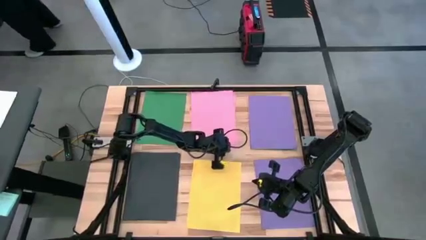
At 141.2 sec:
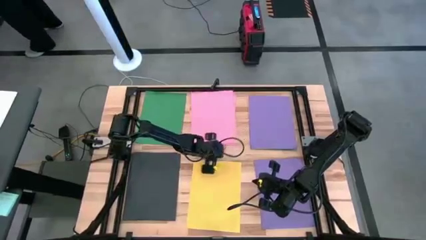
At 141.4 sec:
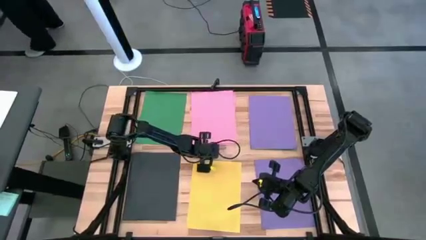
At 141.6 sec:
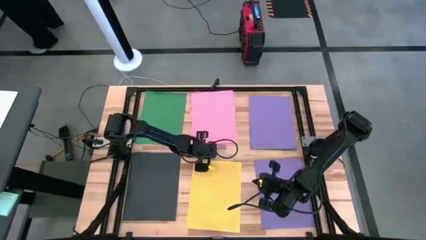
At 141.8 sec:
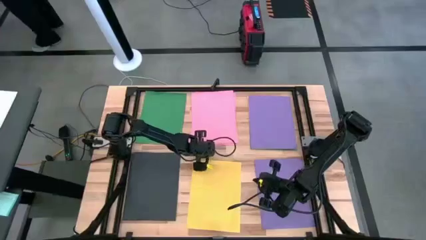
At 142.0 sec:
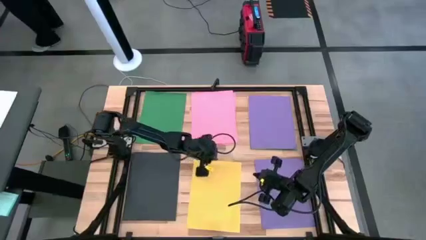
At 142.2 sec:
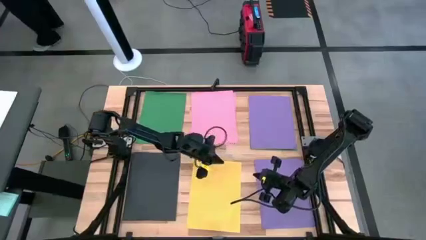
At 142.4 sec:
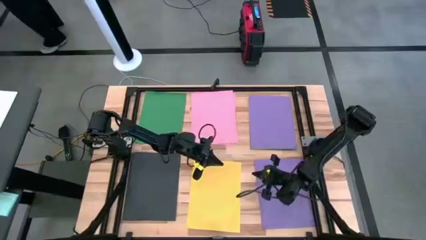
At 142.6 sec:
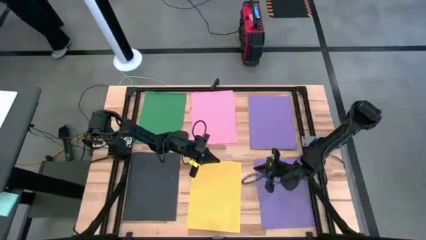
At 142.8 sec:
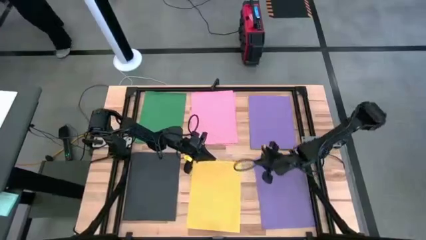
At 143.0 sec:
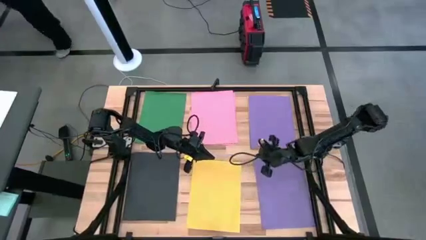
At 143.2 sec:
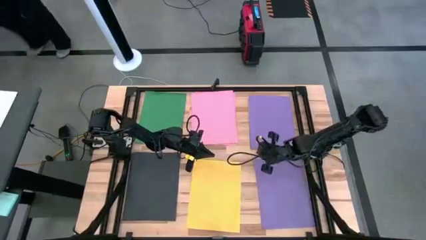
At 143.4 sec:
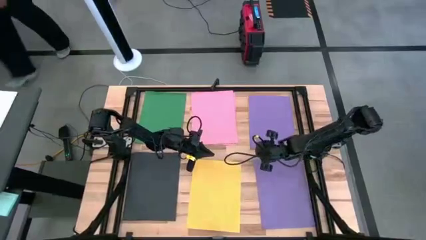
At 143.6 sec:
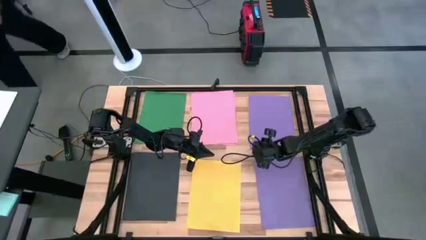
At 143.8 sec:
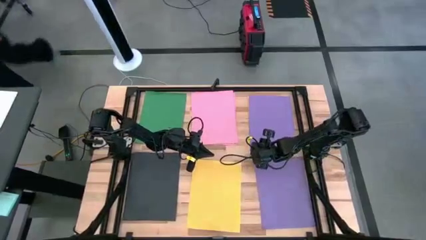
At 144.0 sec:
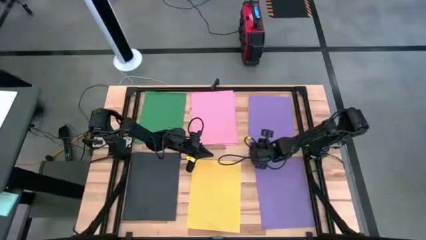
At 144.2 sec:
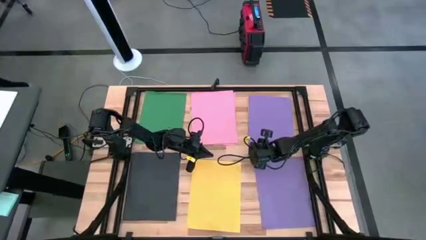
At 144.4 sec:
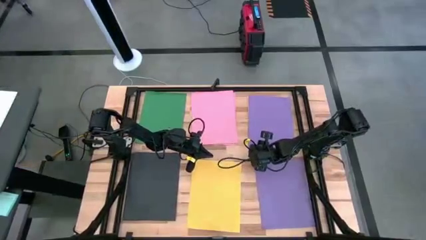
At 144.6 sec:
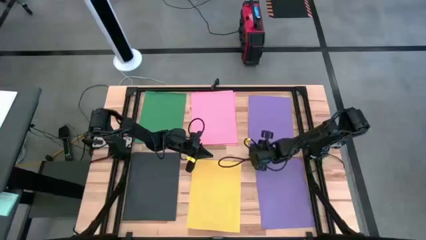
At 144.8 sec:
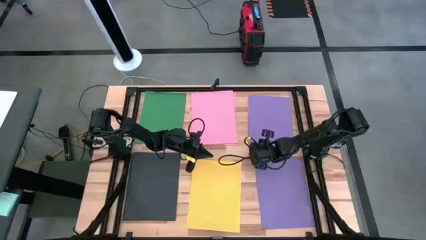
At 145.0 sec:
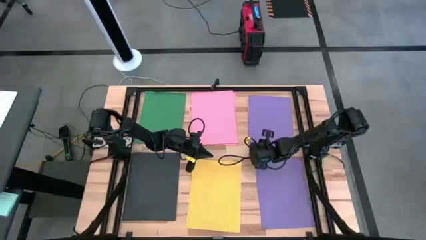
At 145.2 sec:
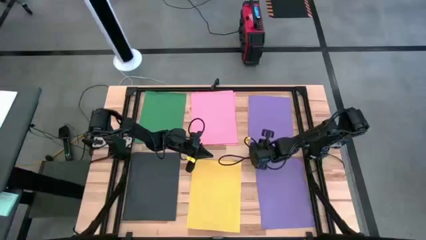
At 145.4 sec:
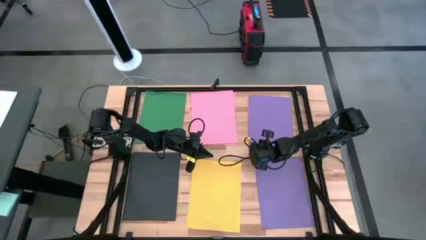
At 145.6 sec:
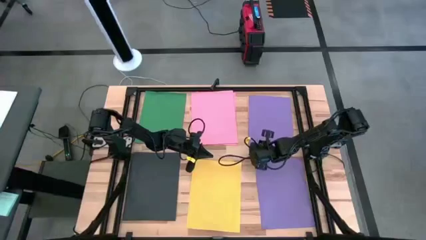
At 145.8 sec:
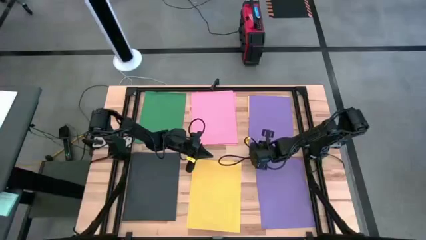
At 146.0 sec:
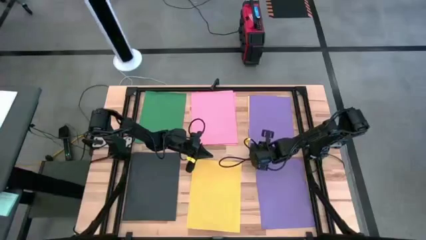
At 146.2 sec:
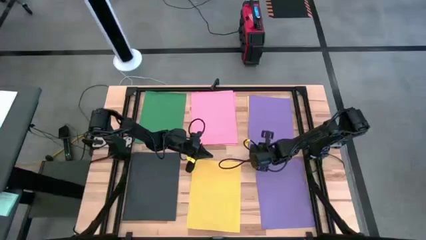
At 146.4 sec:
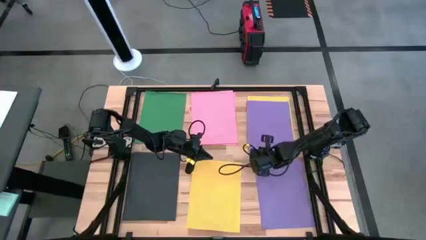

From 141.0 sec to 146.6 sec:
Task: Organize paper
Stack the violet paper on top of the violet paper

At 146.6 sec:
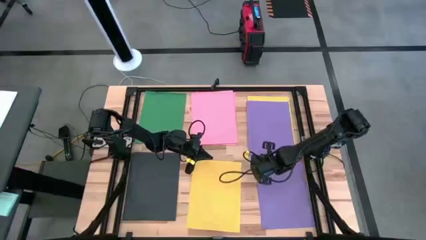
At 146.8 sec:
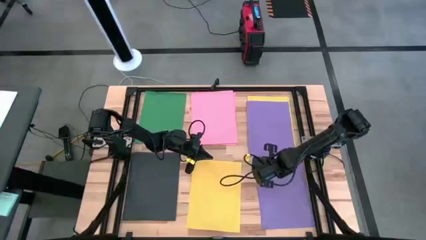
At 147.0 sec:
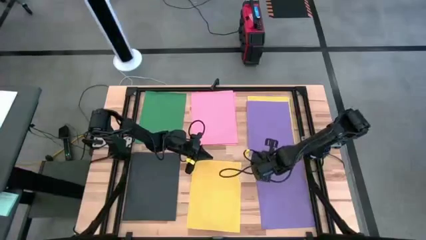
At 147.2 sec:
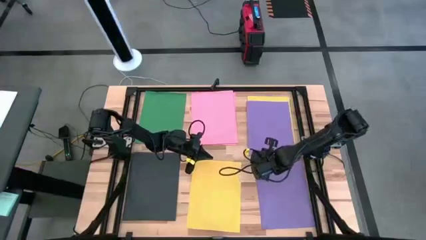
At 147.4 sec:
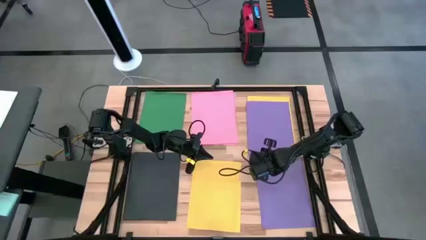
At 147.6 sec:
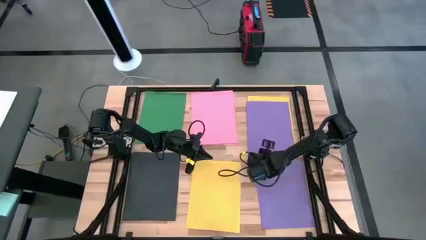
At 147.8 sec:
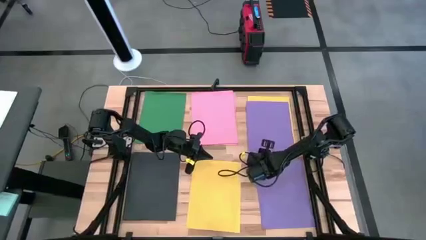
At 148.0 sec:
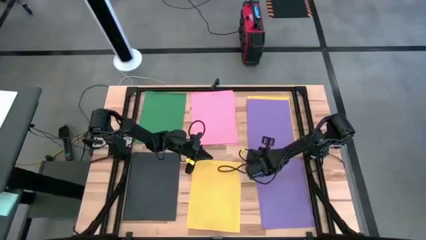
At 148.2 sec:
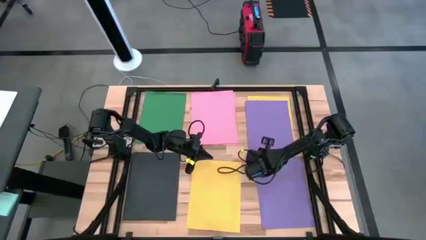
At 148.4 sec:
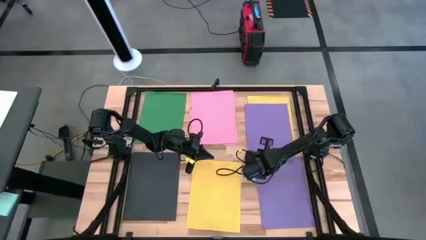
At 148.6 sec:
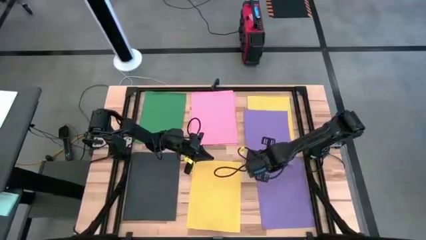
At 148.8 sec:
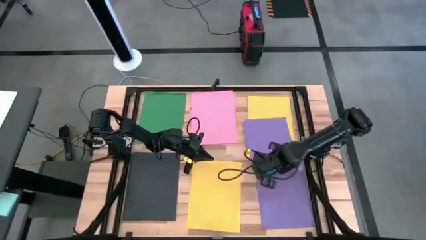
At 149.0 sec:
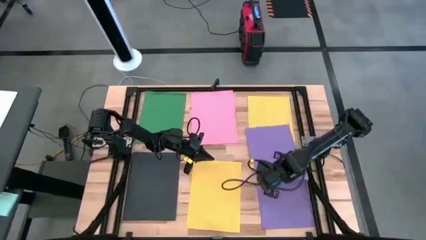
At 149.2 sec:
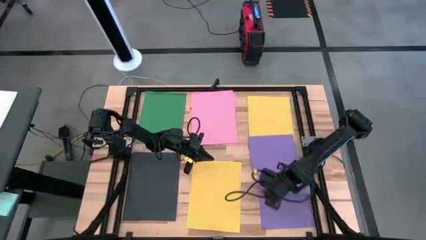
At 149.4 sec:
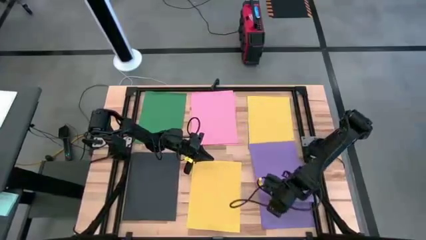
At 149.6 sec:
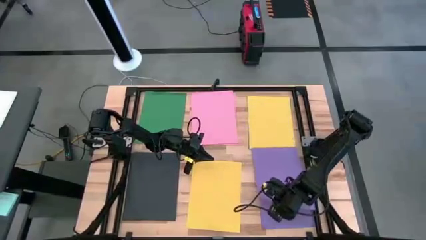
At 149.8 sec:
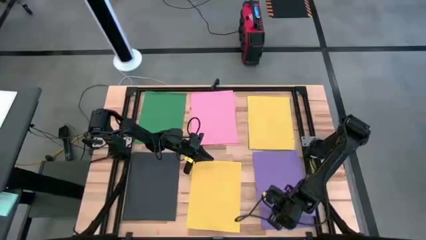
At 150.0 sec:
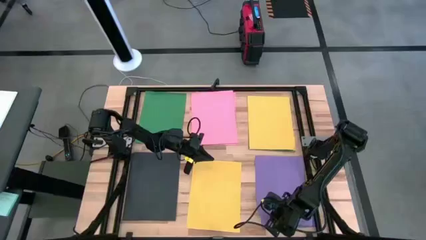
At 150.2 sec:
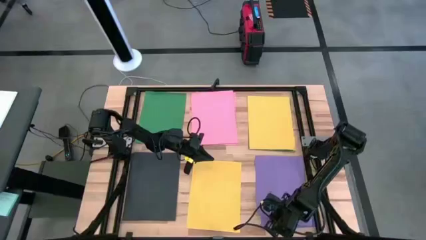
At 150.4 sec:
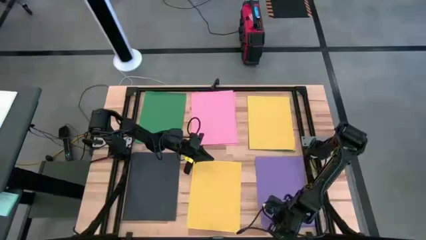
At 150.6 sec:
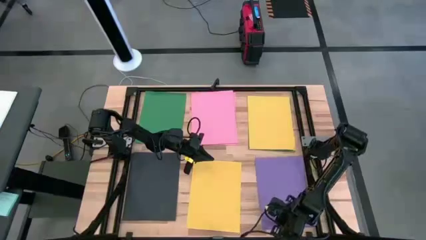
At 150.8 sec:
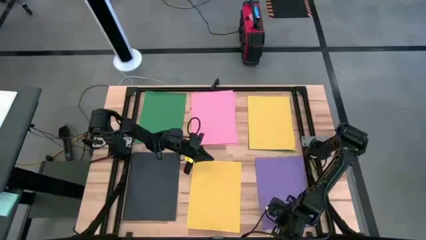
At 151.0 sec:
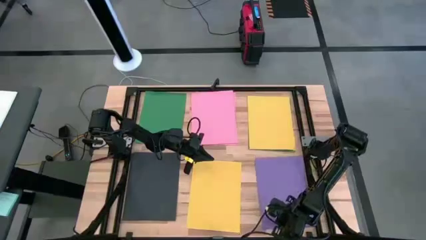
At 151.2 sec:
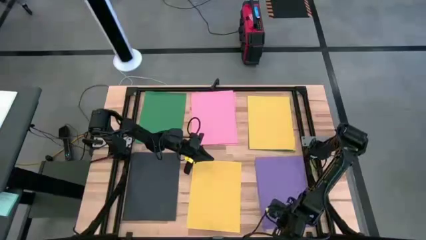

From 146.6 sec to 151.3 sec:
Stack the violet paper on top of the violet paper

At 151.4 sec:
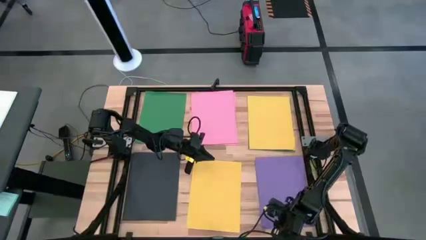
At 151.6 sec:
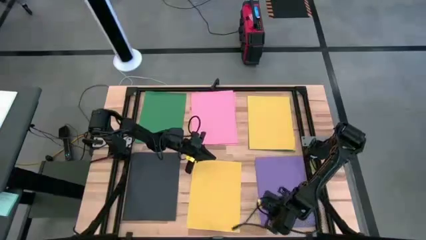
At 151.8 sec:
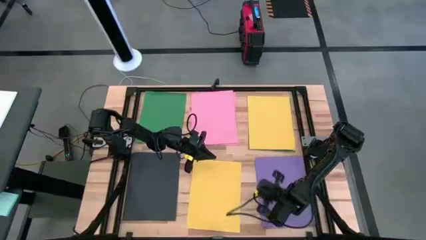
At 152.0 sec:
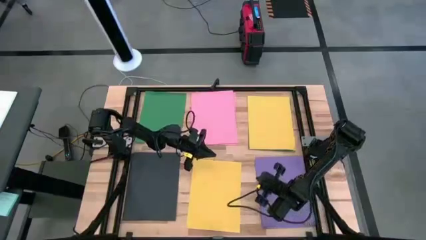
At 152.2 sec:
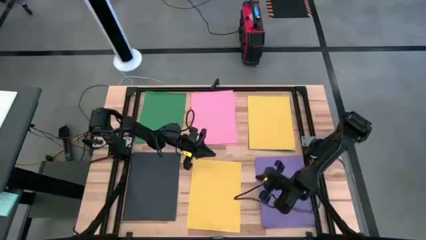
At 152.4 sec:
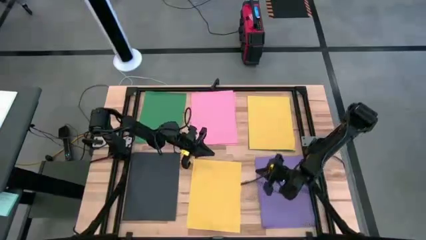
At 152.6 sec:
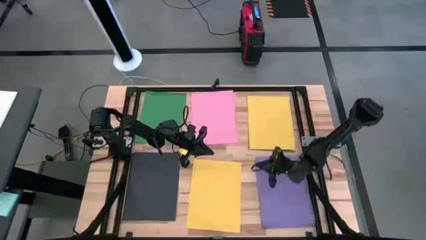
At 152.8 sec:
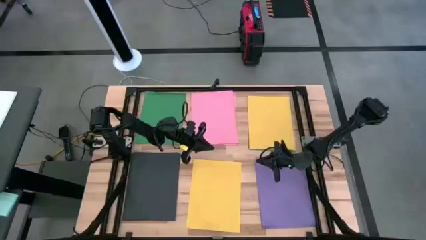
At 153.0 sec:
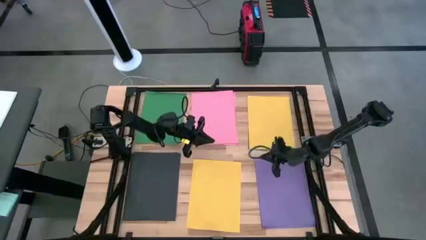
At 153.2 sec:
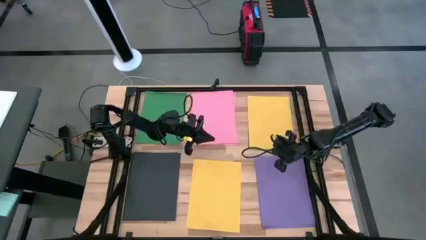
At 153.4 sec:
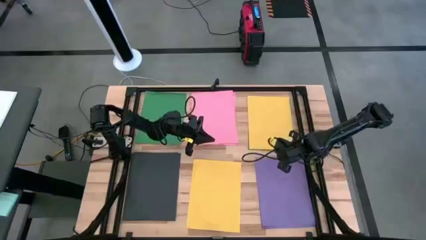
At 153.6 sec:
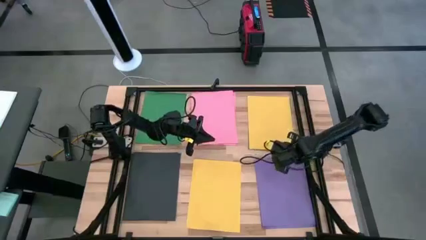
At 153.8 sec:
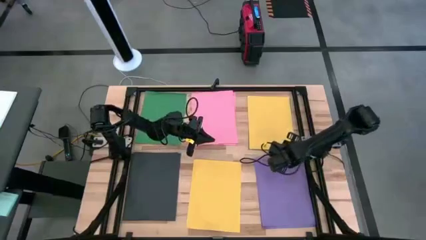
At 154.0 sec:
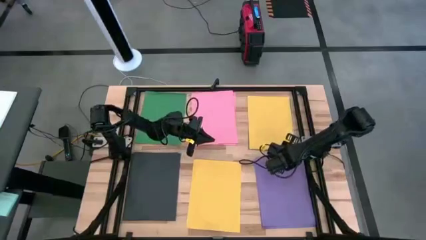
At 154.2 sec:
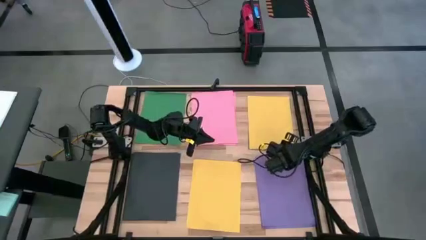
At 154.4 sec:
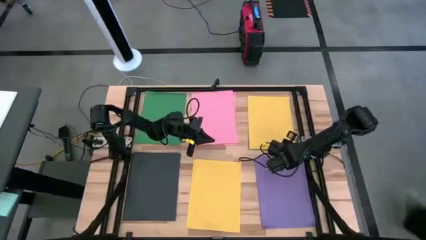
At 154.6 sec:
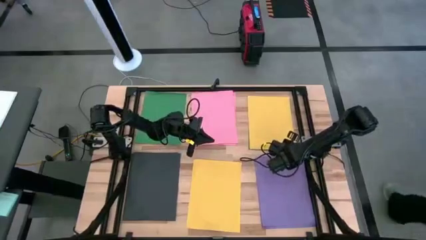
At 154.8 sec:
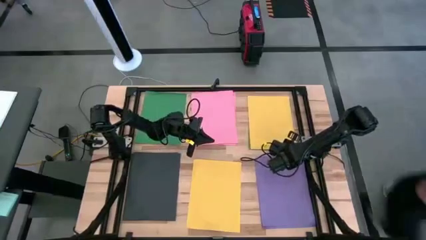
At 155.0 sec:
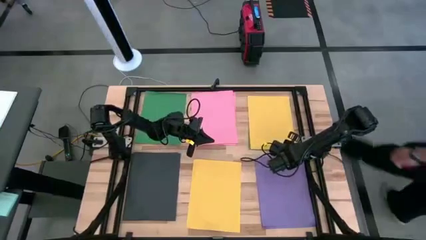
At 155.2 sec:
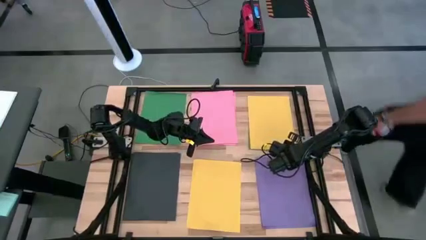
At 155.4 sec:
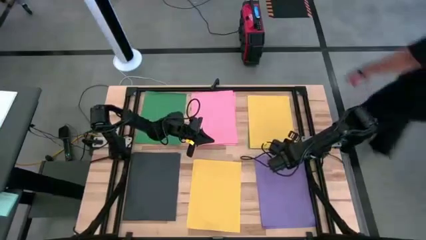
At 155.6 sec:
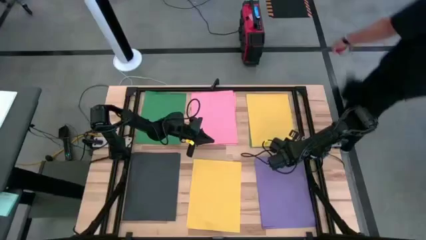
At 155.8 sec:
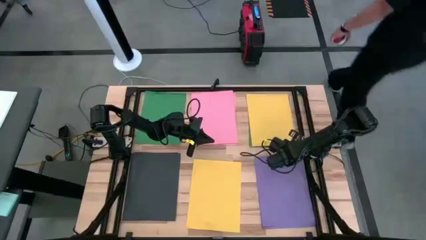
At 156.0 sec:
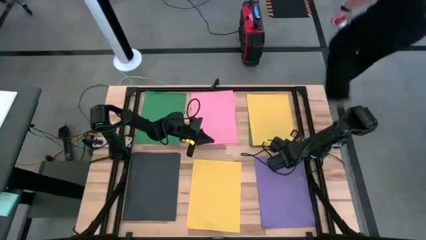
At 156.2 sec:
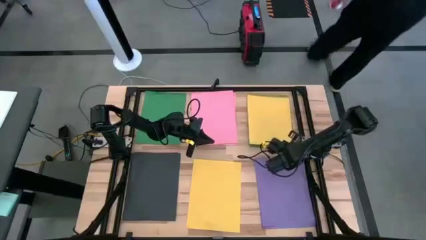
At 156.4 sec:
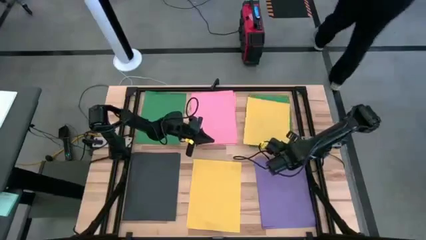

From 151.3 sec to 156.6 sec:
Stack the yellow paper on top of the yellow paper
